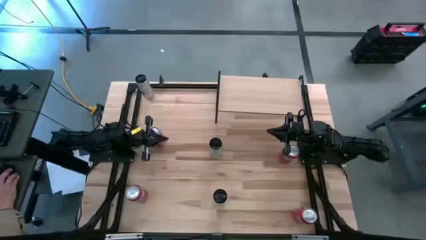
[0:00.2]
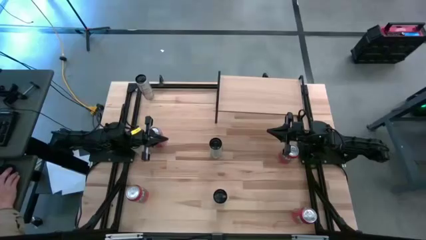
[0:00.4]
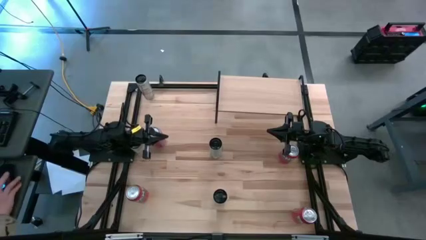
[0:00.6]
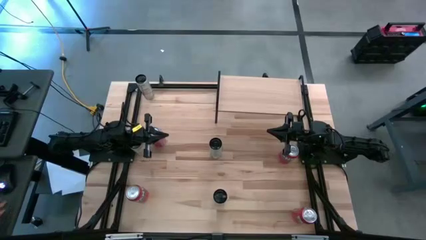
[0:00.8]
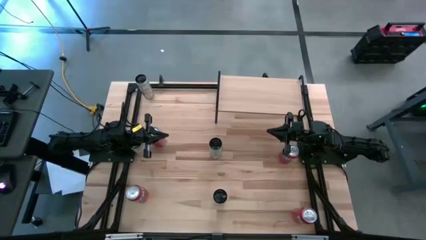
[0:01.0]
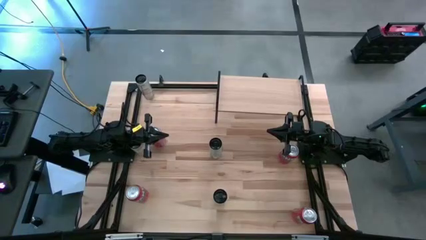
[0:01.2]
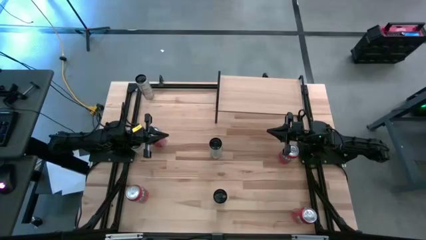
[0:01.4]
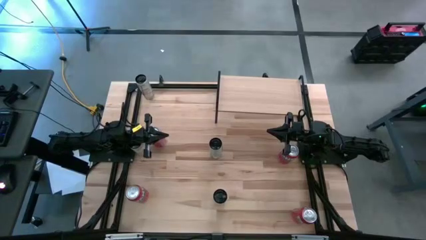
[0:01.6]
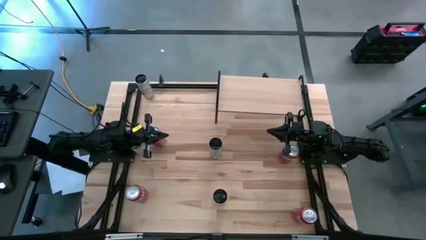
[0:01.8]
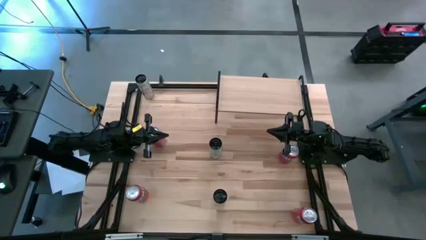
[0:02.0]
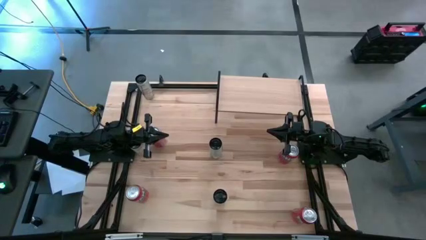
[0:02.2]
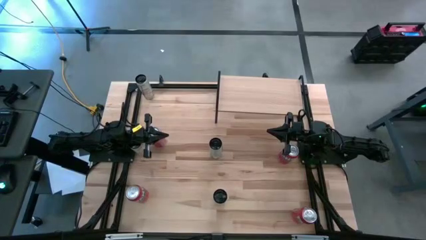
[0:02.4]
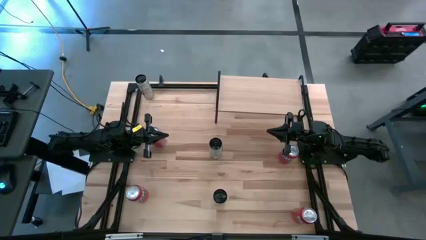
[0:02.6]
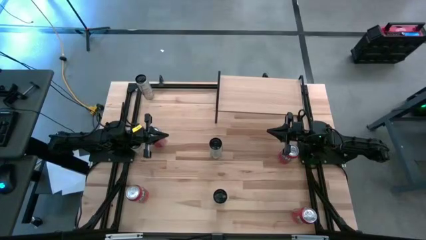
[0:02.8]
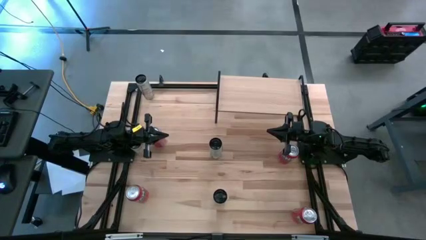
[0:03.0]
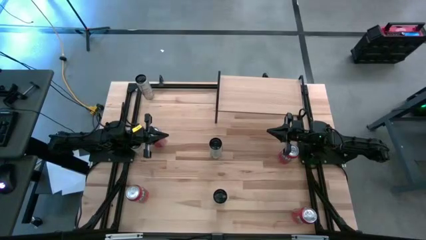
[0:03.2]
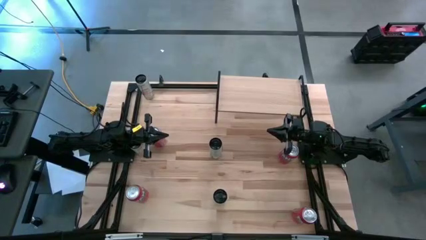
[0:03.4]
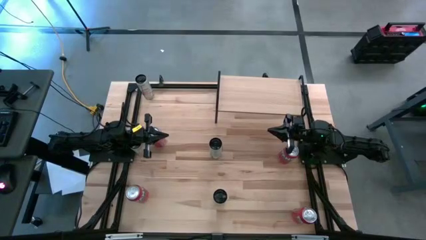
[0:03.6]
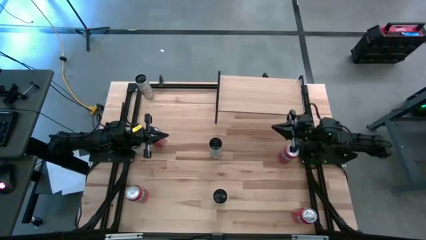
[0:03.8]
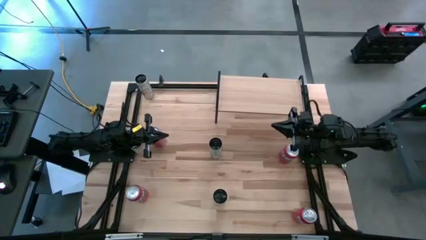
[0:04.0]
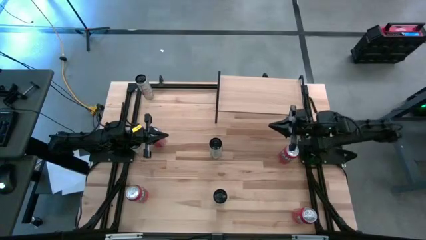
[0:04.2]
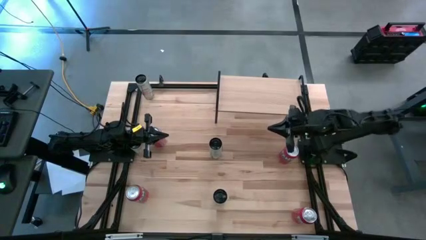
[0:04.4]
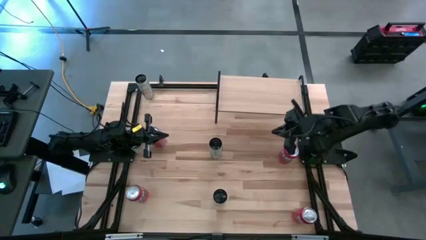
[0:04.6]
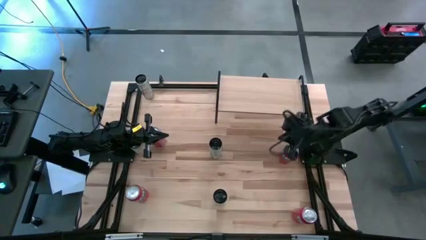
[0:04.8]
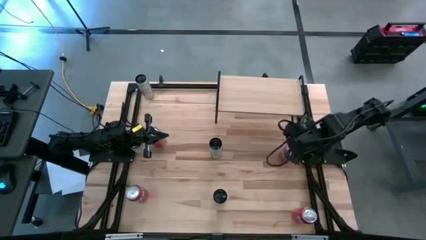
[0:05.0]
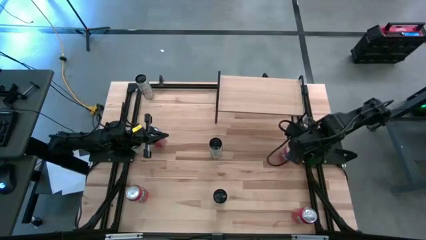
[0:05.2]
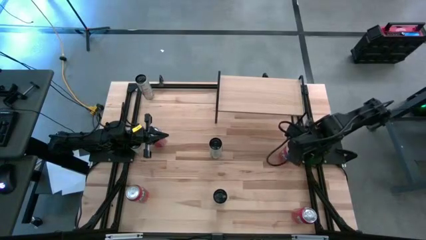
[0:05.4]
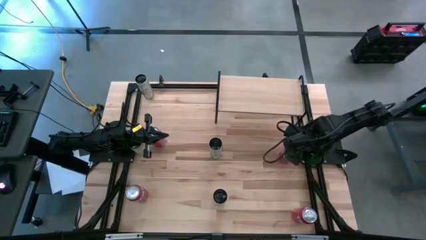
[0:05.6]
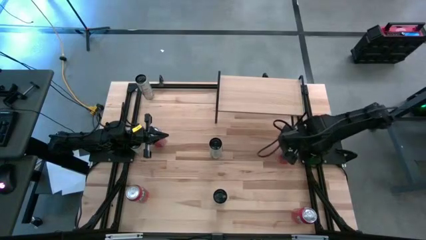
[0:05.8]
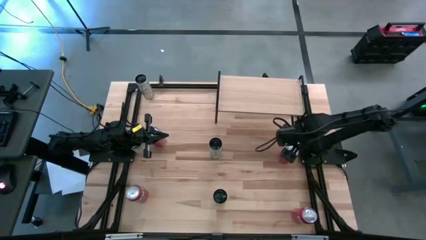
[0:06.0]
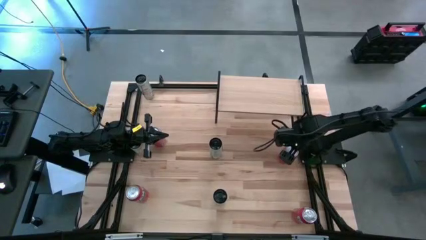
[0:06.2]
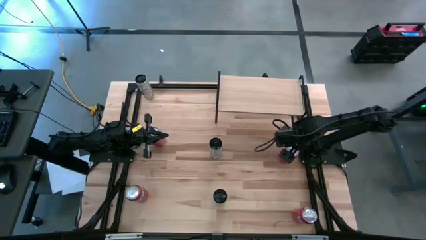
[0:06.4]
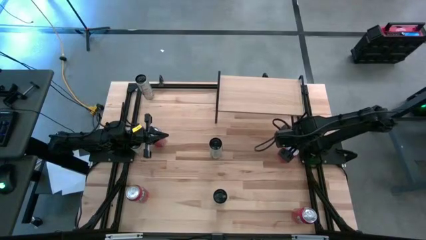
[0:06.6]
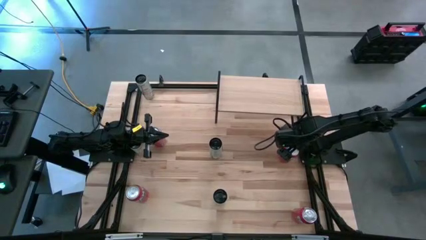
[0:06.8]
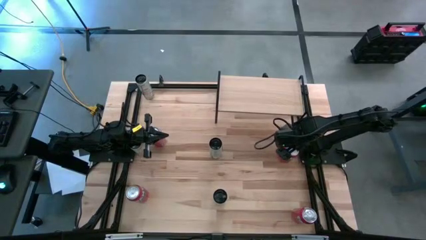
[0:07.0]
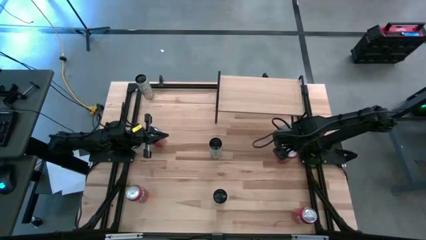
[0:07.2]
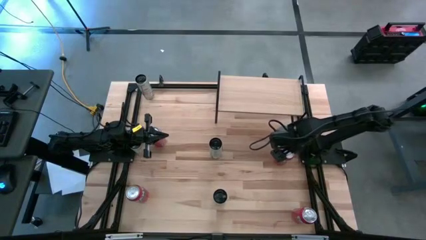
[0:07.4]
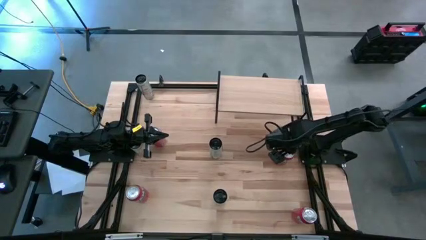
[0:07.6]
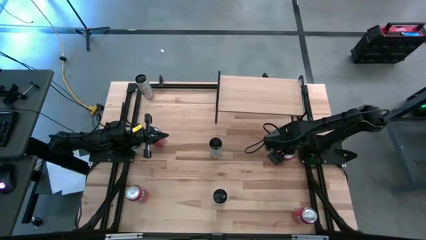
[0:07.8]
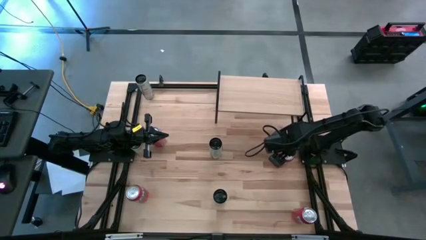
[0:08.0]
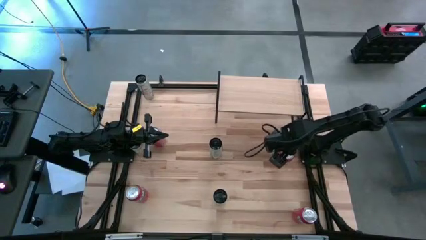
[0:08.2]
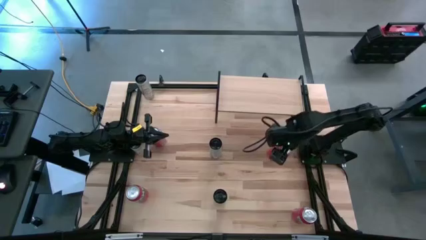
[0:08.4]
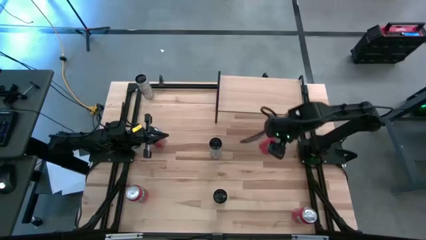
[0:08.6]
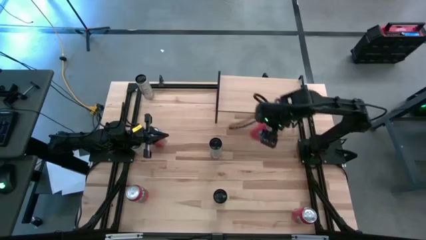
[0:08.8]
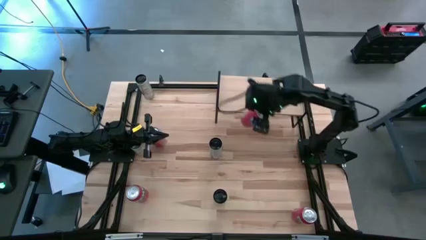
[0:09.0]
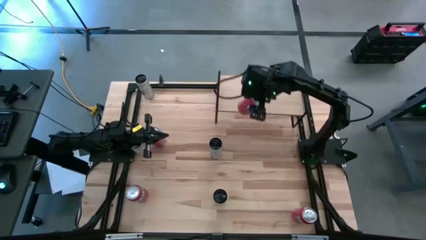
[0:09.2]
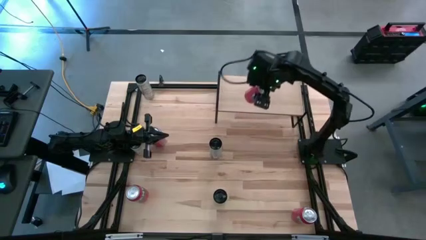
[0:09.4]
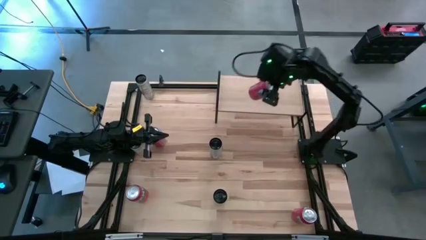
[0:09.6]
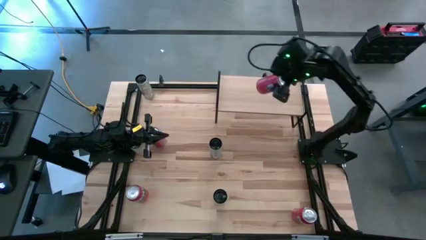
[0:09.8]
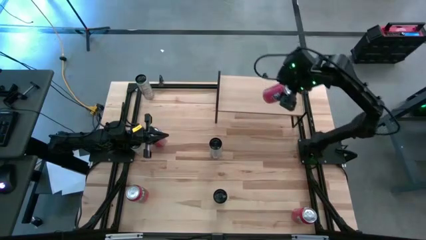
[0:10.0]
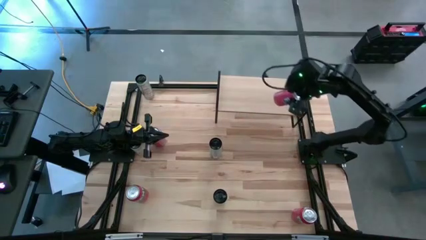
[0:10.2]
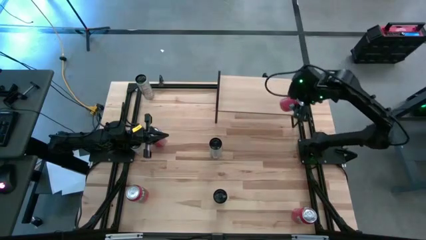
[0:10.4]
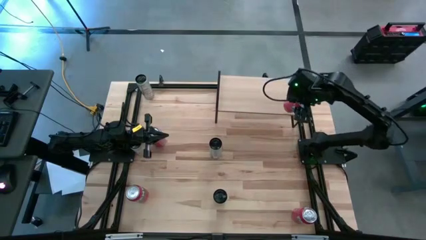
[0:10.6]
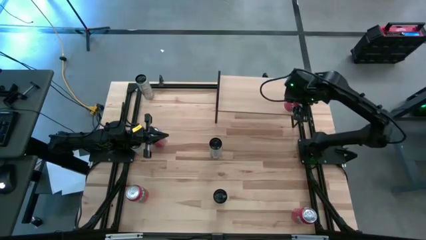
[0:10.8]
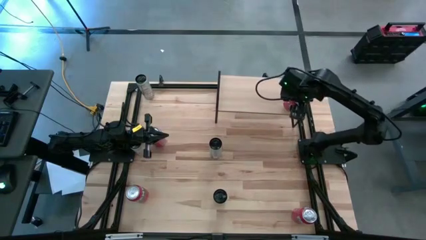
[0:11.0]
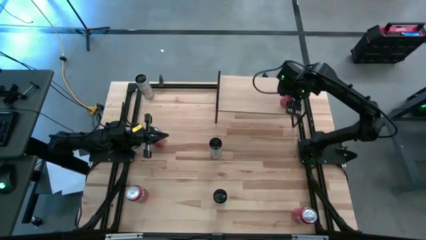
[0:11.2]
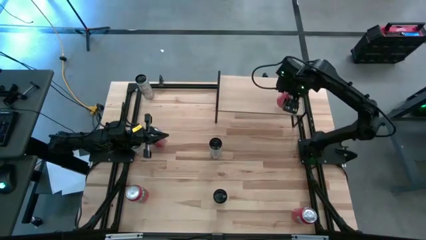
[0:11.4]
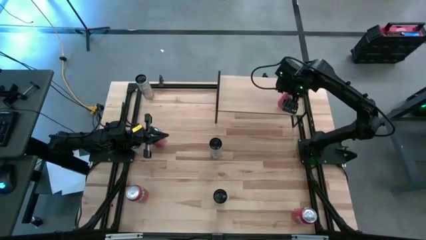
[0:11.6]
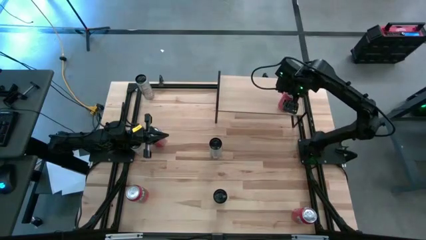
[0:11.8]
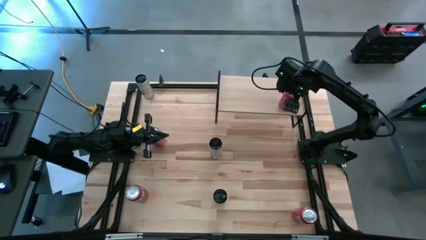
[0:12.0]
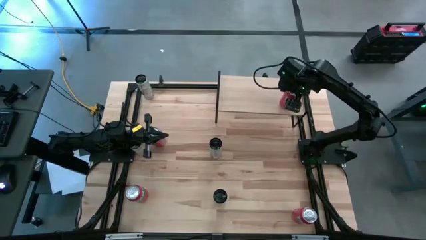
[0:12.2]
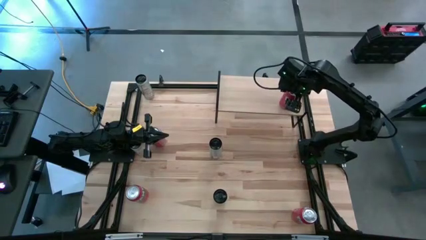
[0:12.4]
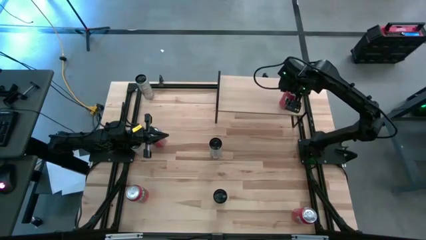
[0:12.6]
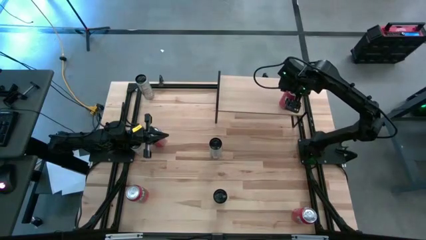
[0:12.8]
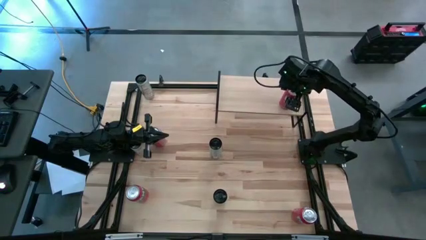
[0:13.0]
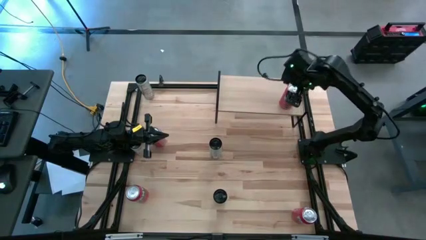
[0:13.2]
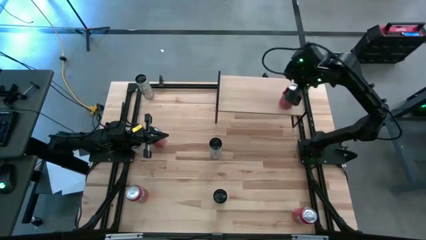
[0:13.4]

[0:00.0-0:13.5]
Task: Place canned beverage on shelf
Put the orange soda can on the shelf
